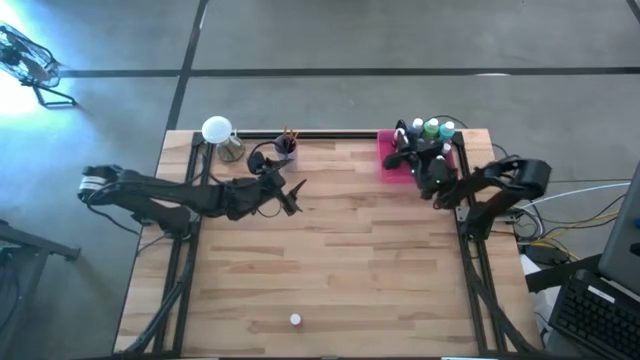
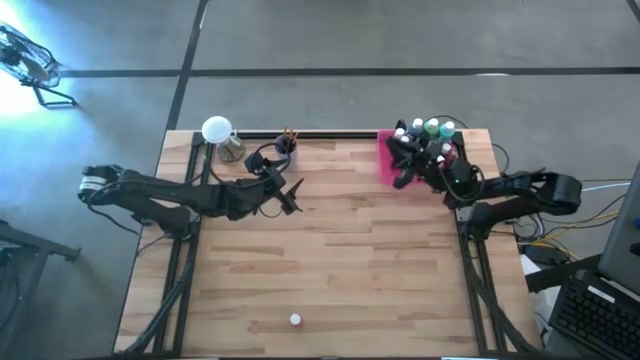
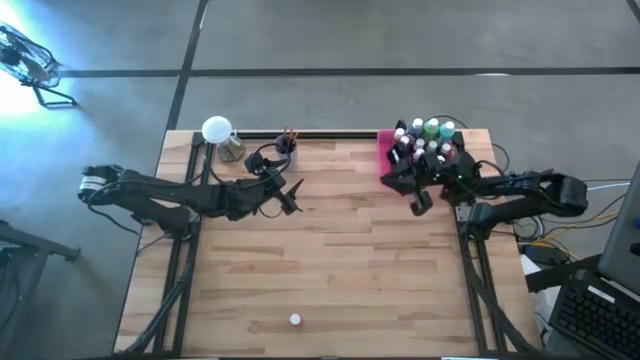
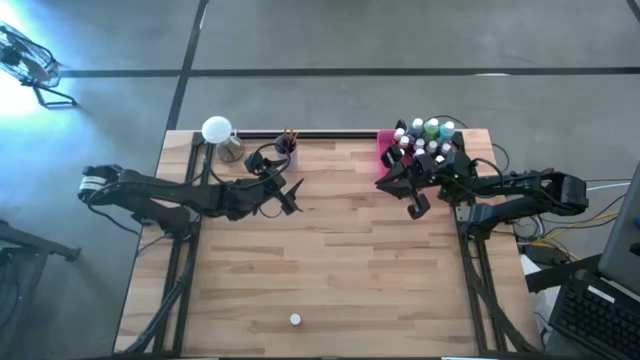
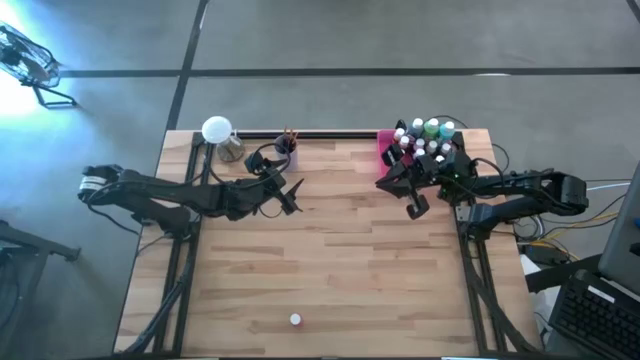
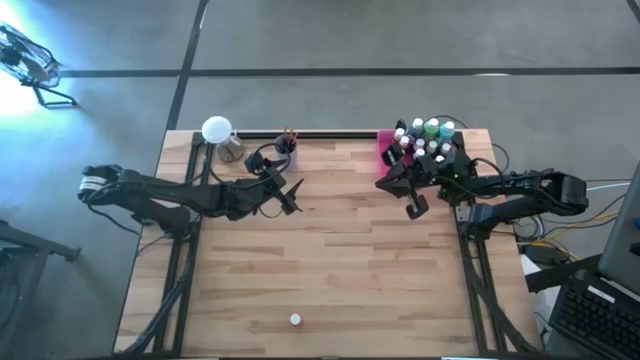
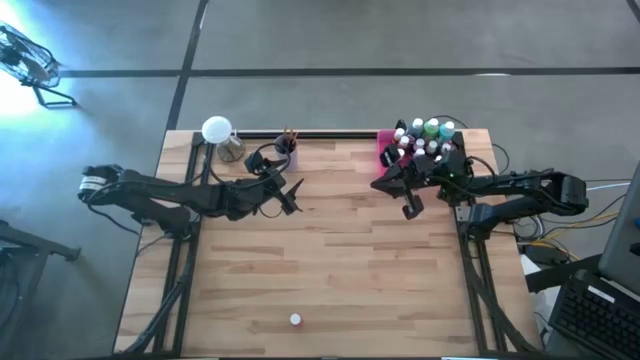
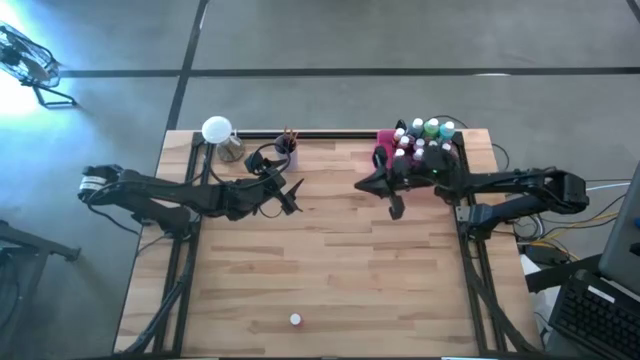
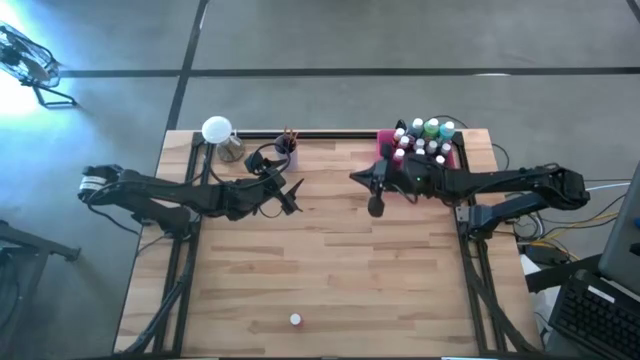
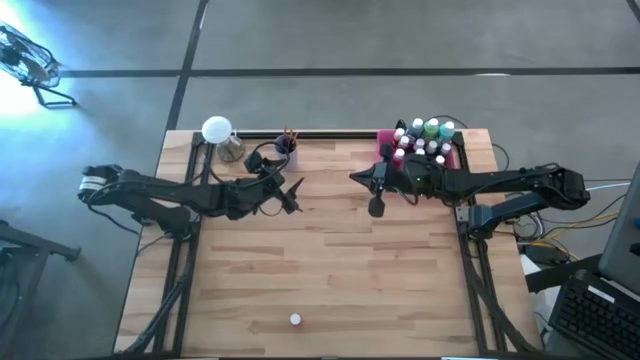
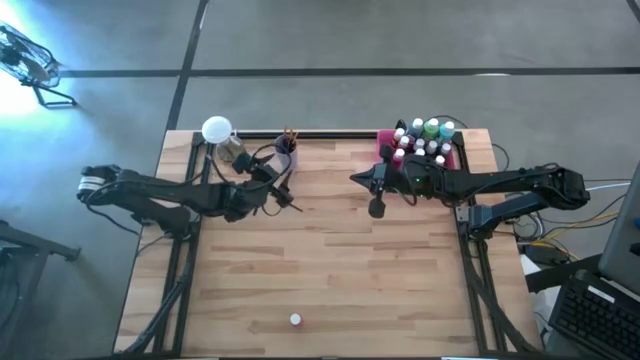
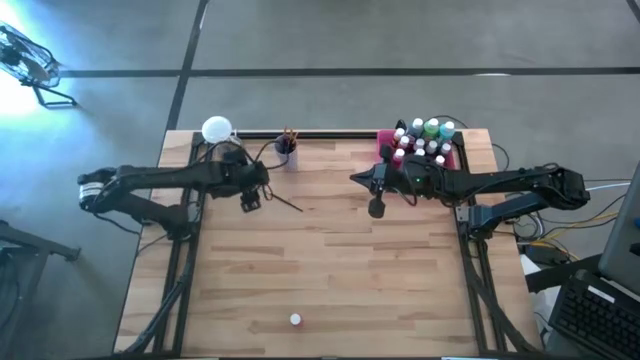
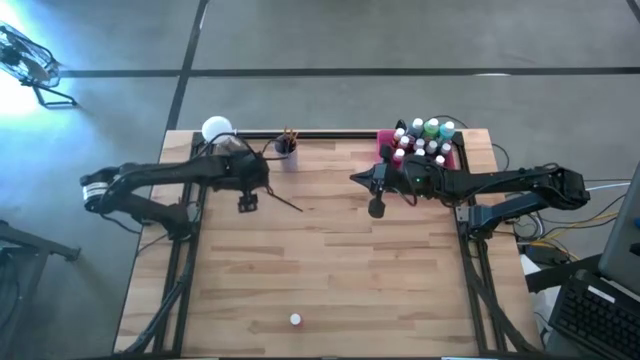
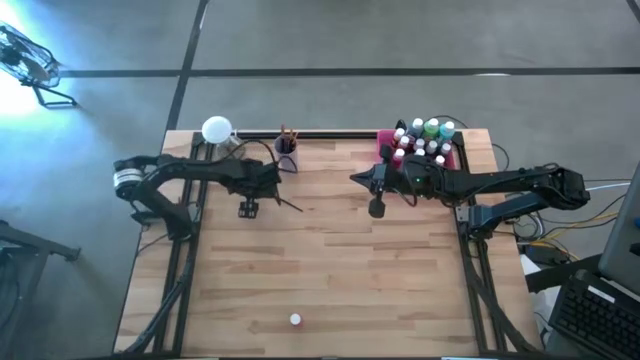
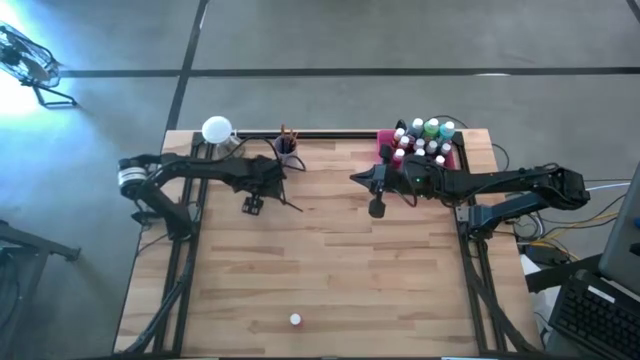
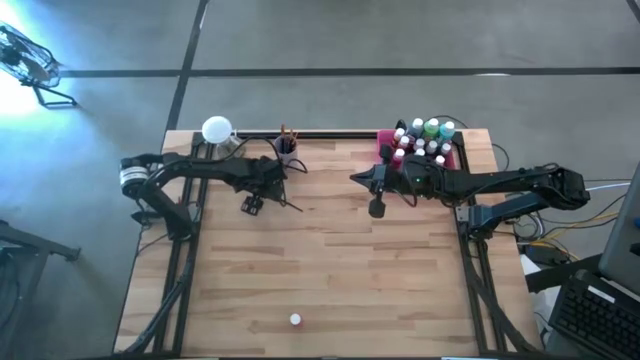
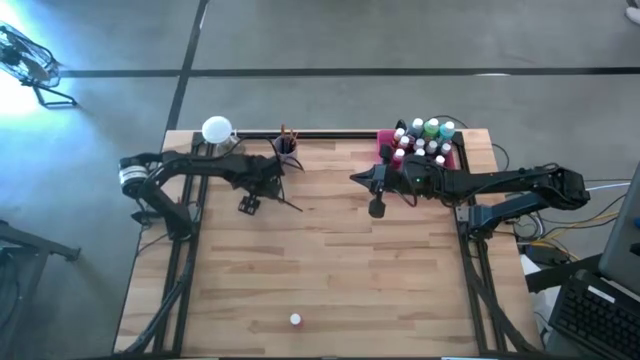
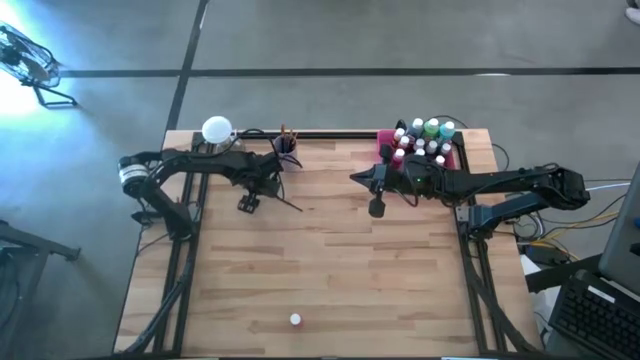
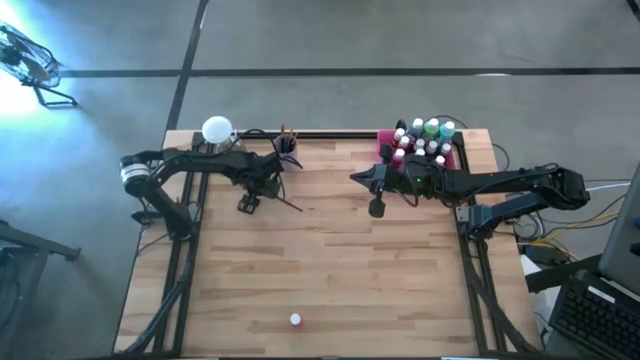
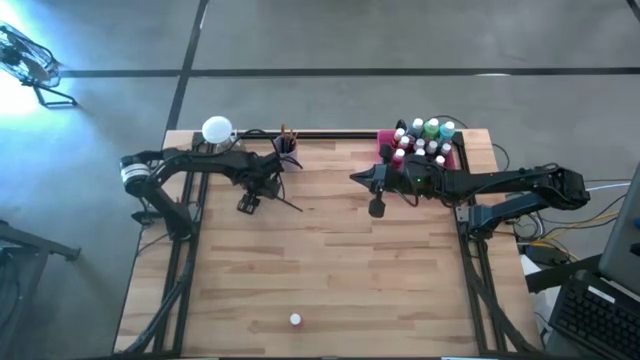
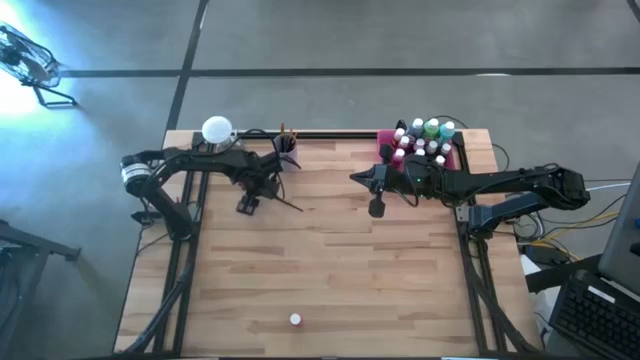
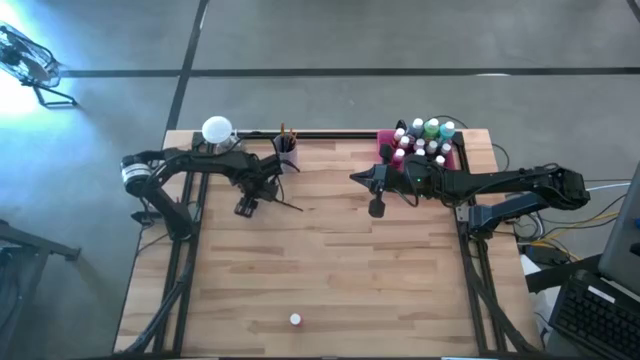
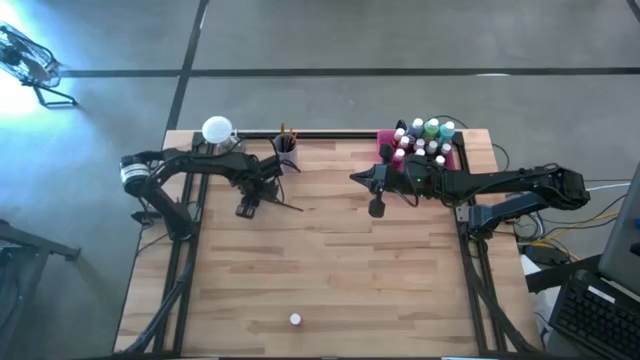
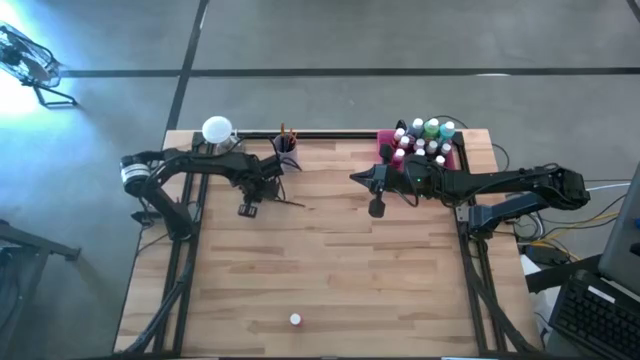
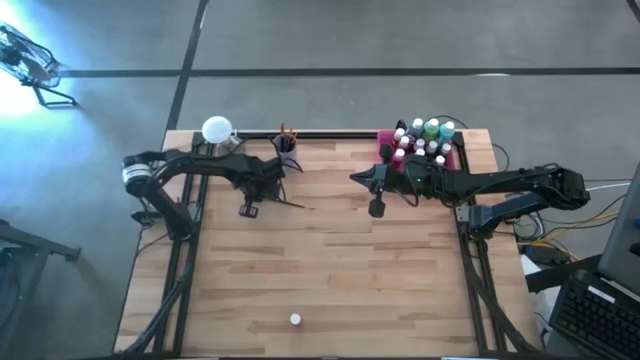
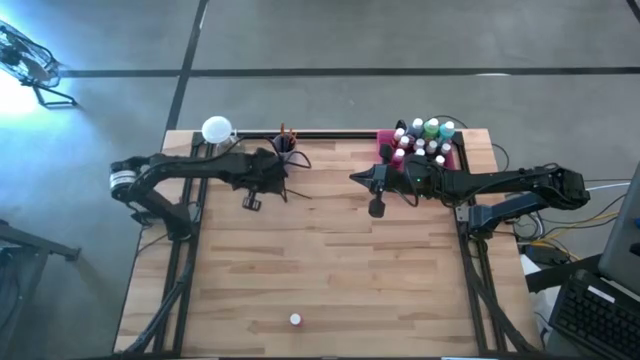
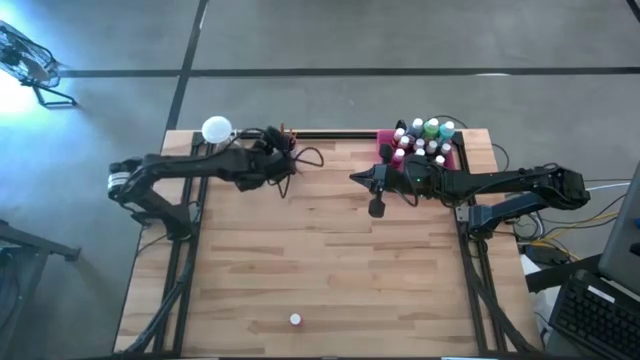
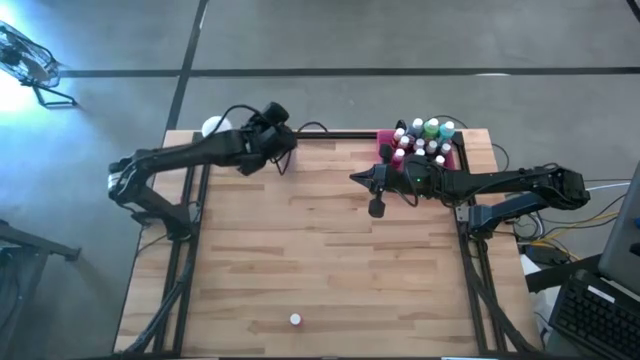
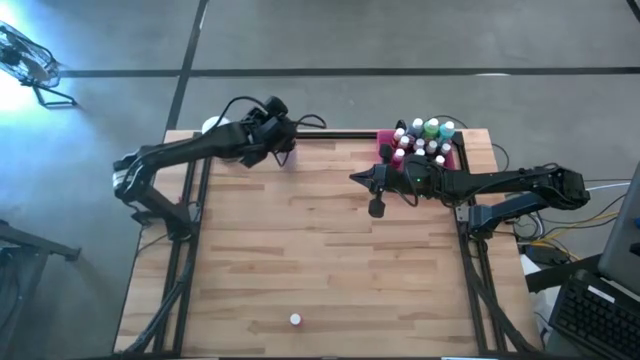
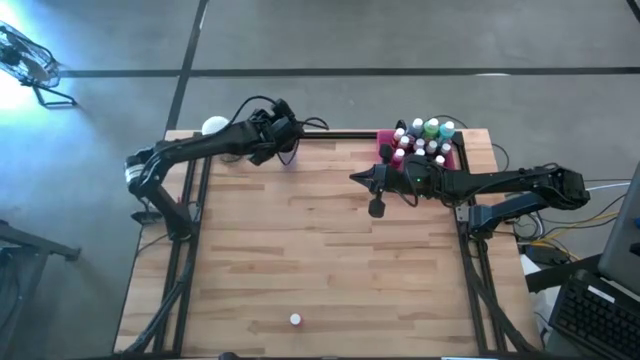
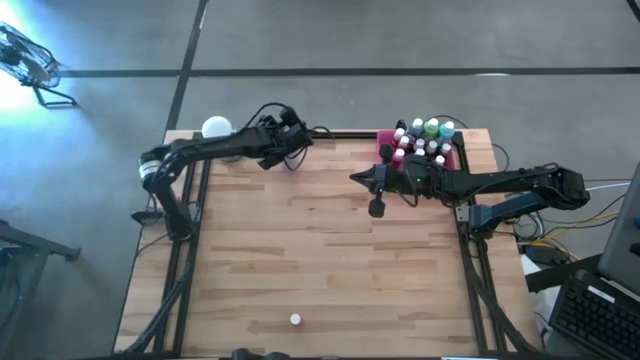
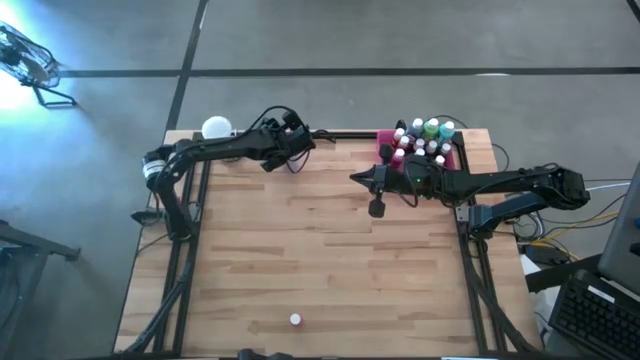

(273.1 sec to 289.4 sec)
Task: Pick & Place Paint Supplies
Put the gold black paint brush into the purple cup

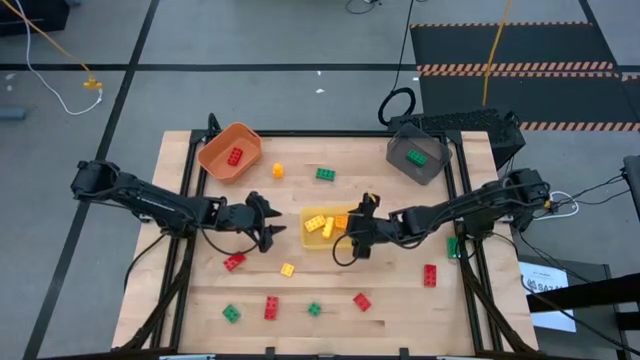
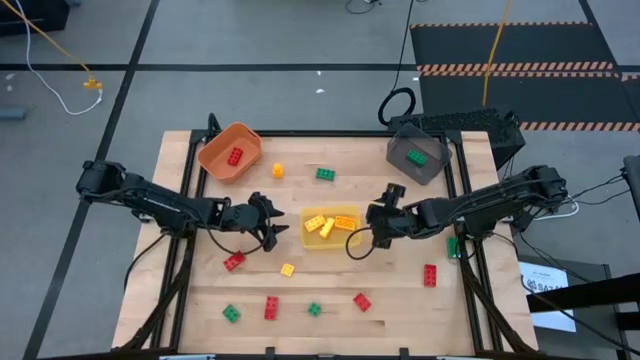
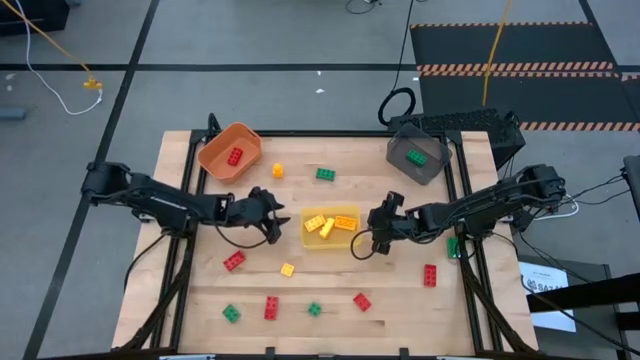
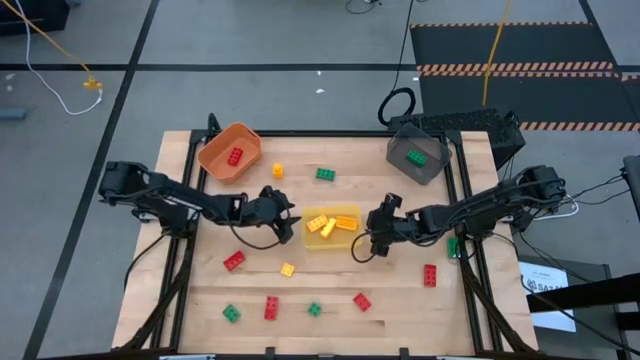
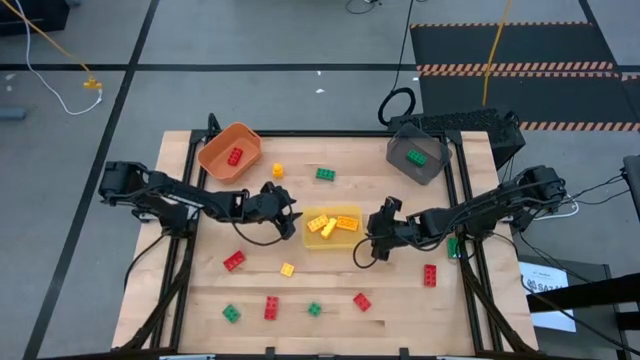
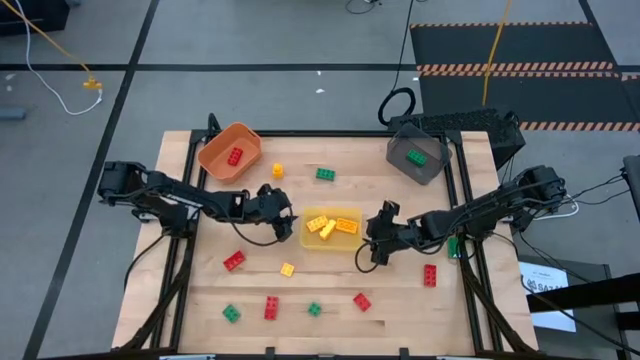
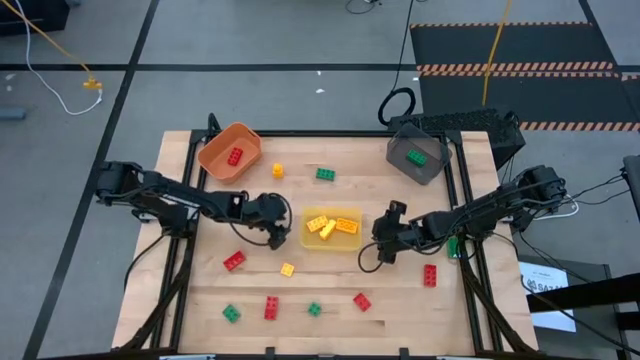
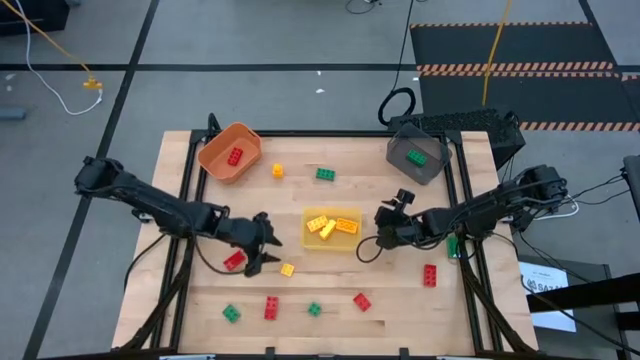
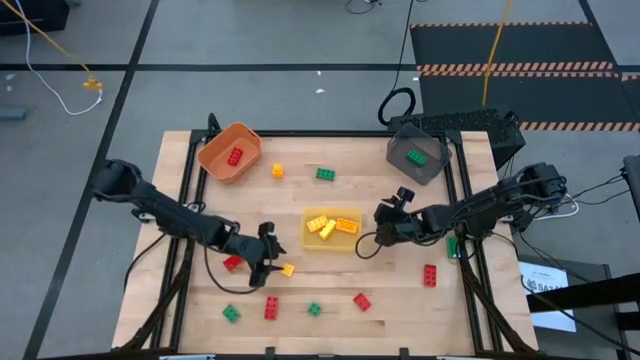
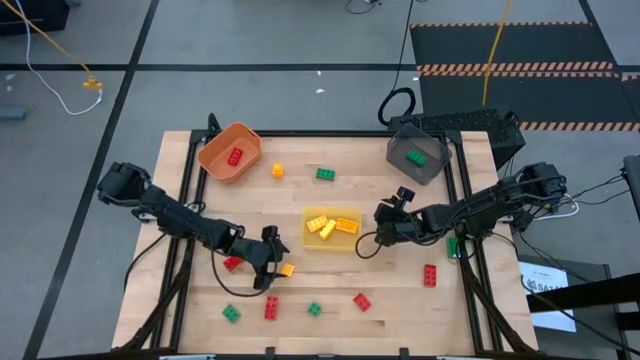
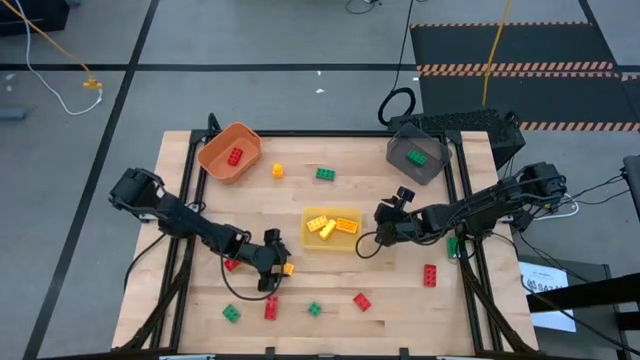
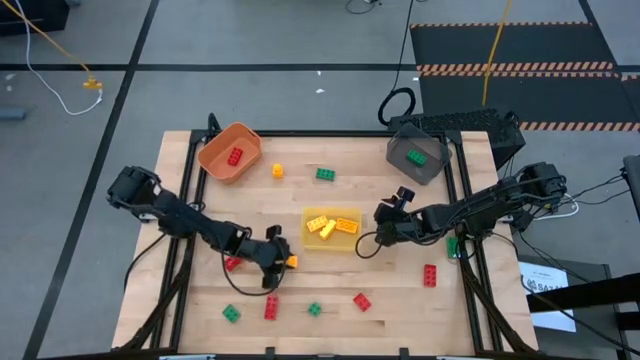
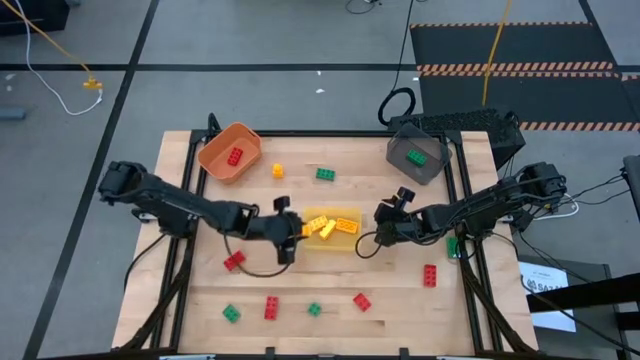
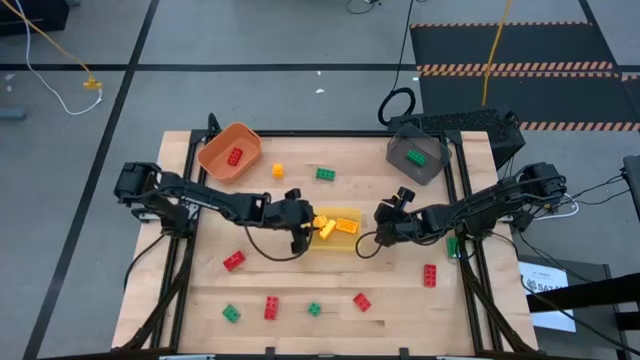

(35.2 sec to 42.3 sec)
Task: Sort & place blocks by color
Put the bottom yellow 4-stud game piece into the yellow bin
